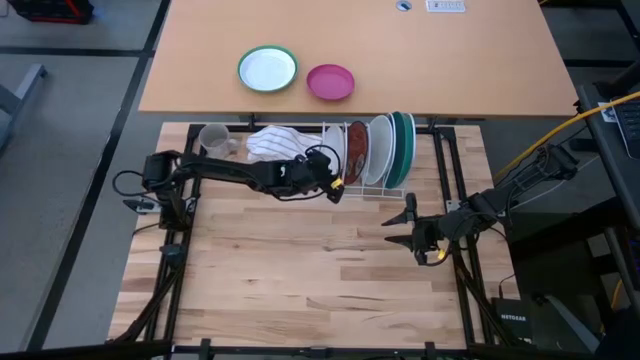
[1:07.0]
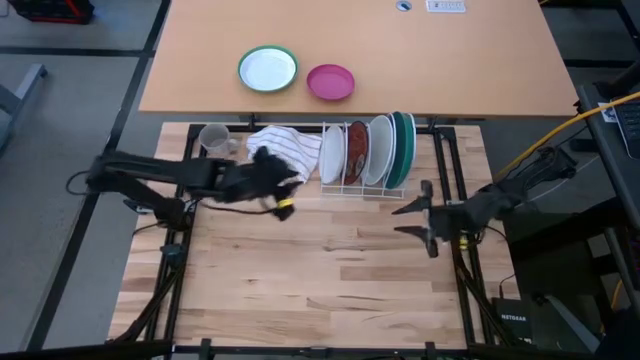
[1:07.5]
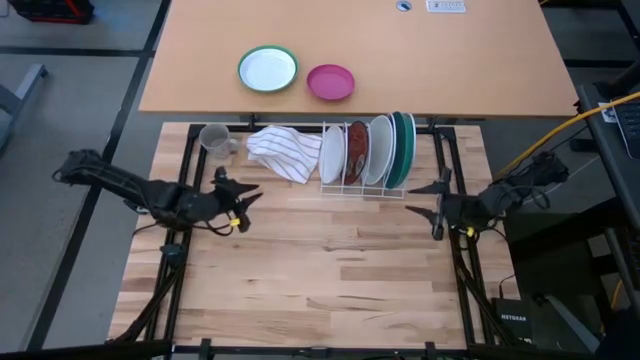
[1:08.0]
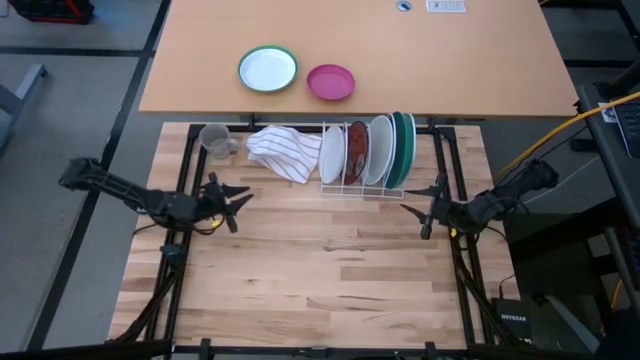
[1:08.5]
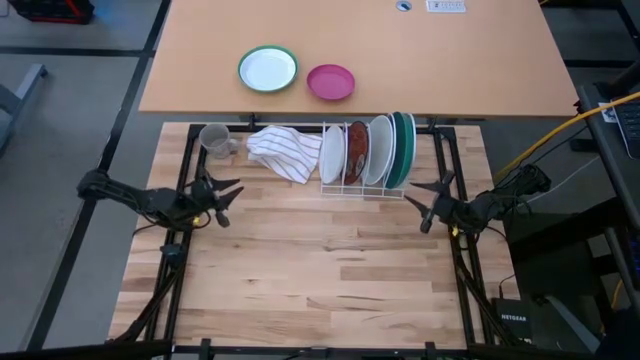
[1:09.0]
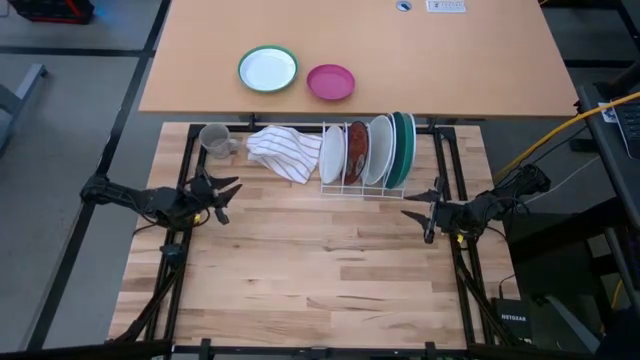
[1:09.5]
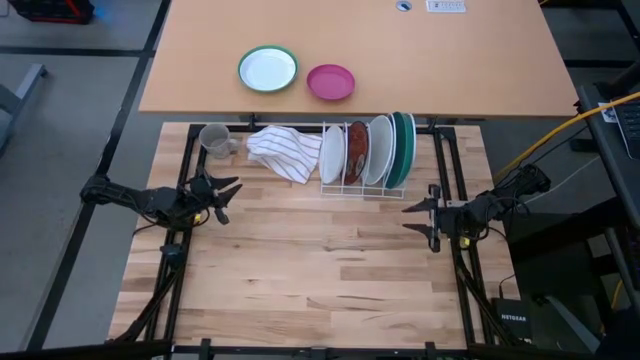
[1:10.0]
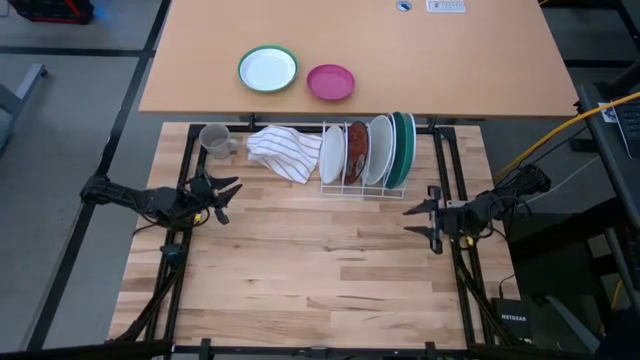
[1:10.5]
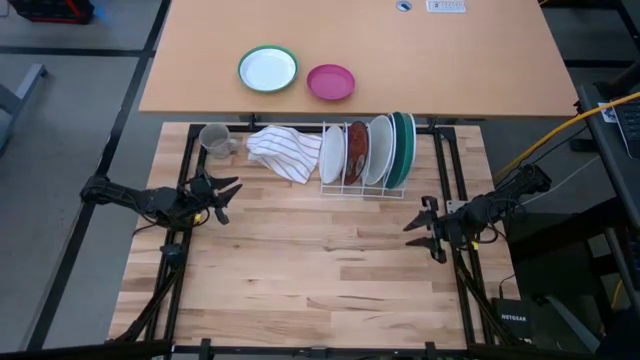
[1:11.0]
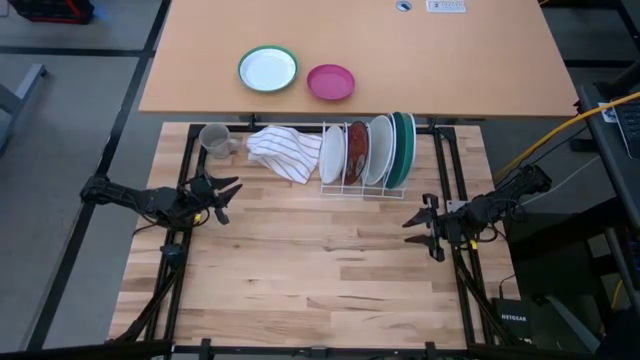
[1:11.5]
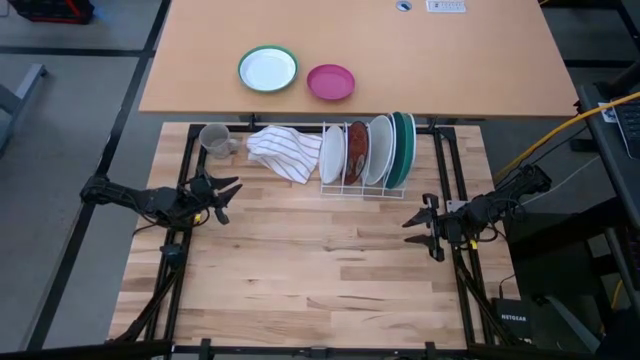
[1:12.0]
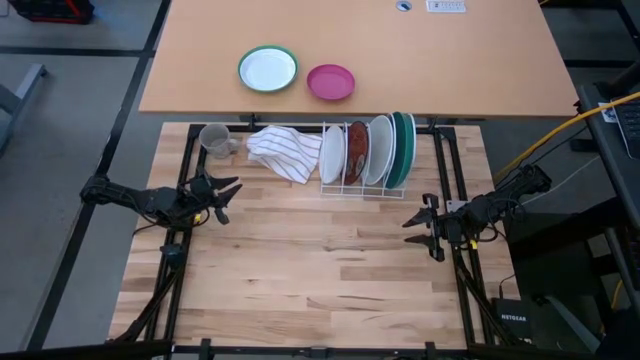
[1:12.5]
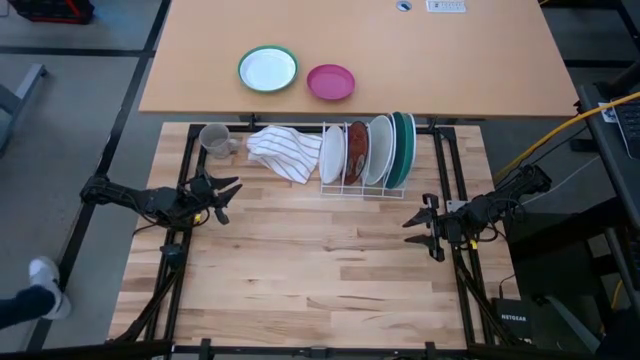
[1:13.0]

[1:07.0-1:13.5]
Task: Sort dishes
Return to Home Position

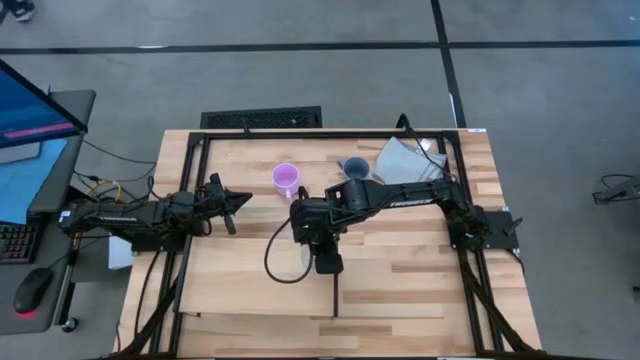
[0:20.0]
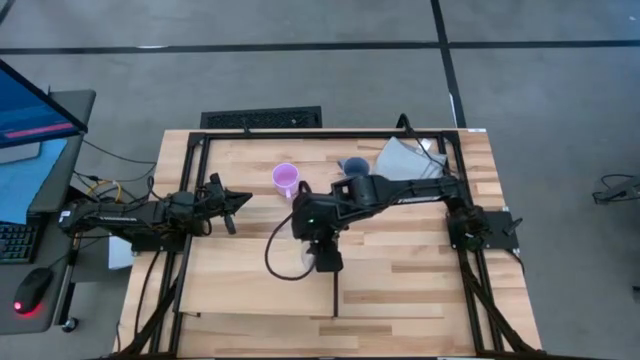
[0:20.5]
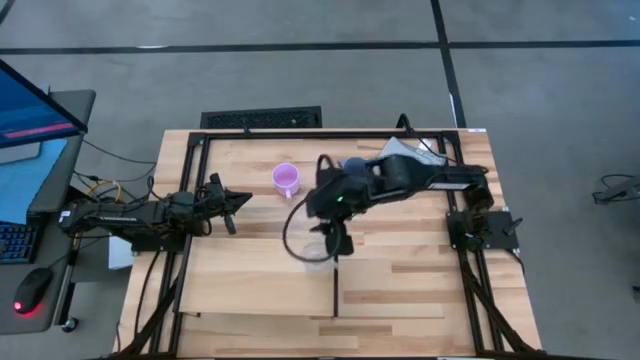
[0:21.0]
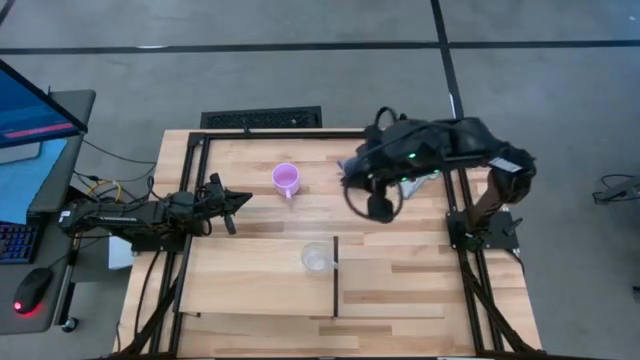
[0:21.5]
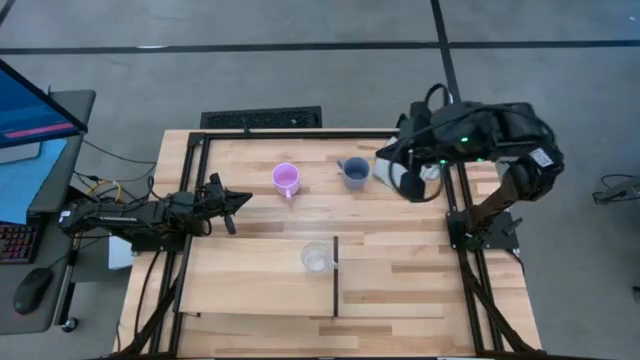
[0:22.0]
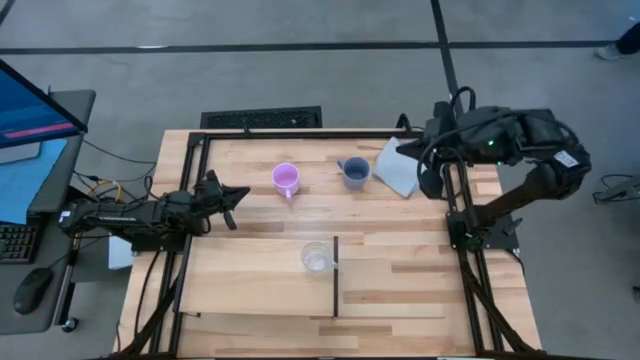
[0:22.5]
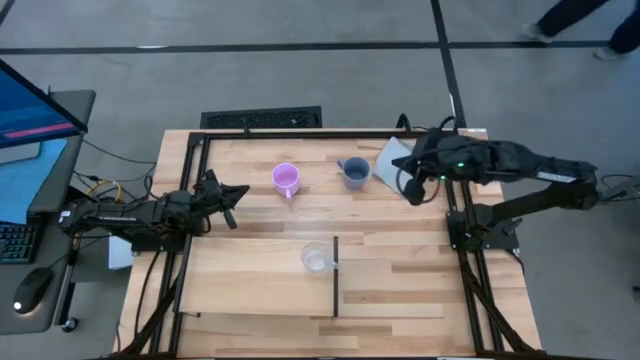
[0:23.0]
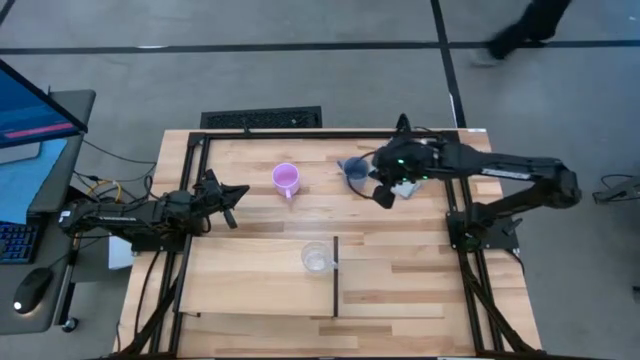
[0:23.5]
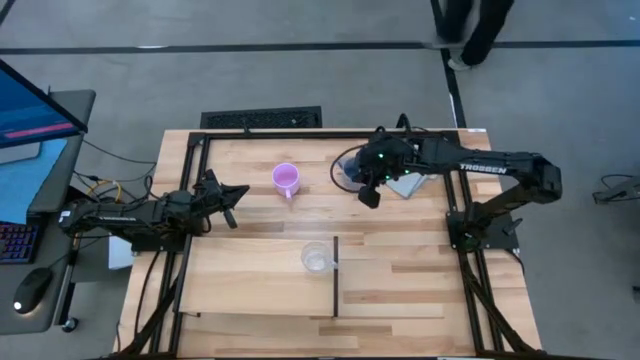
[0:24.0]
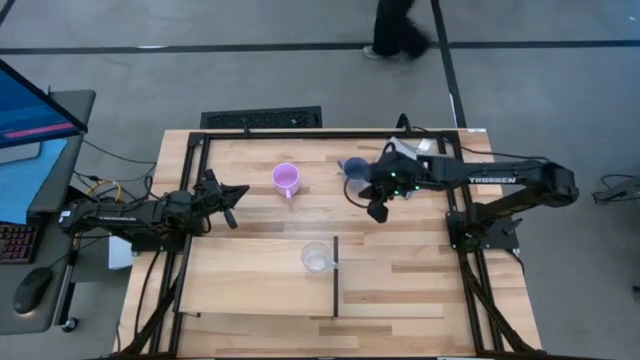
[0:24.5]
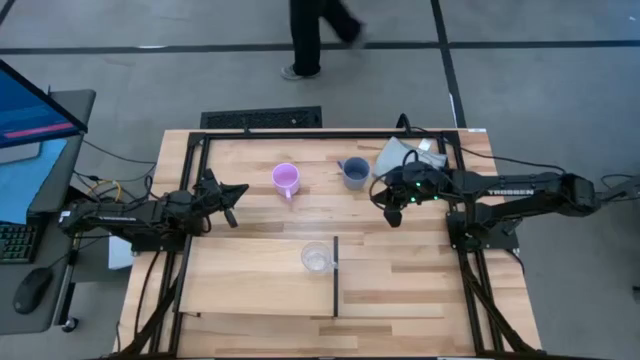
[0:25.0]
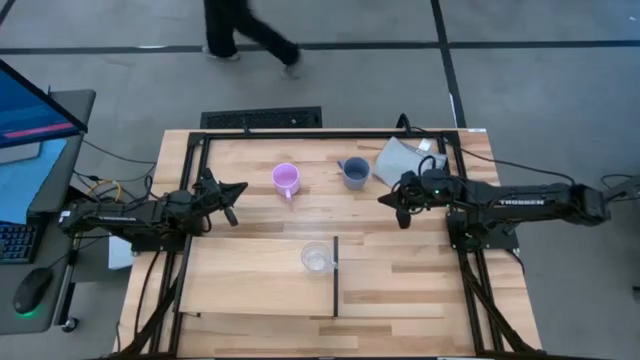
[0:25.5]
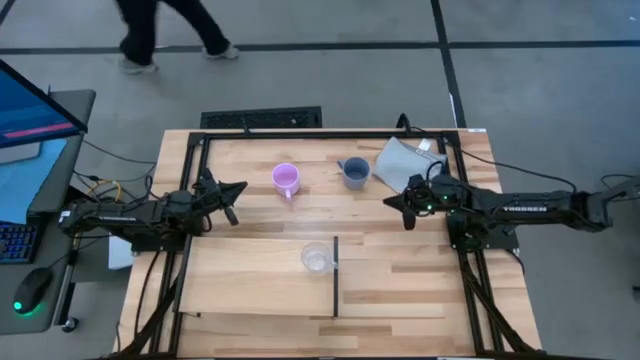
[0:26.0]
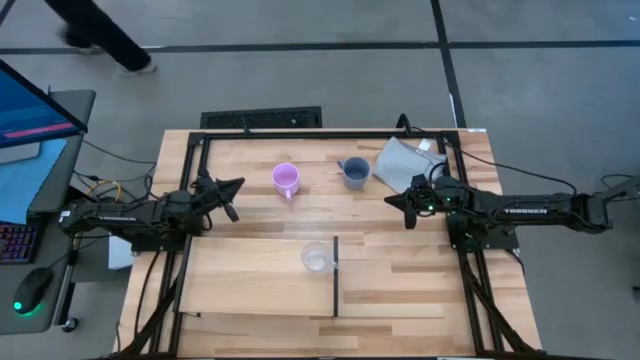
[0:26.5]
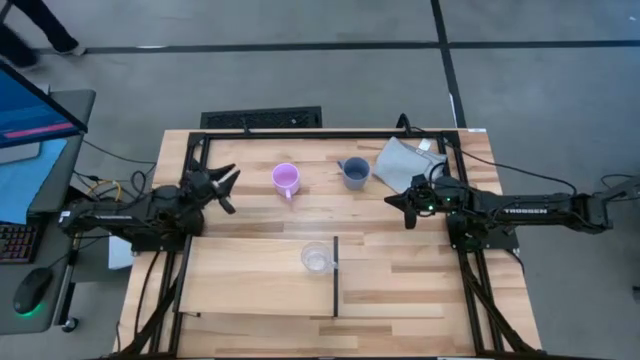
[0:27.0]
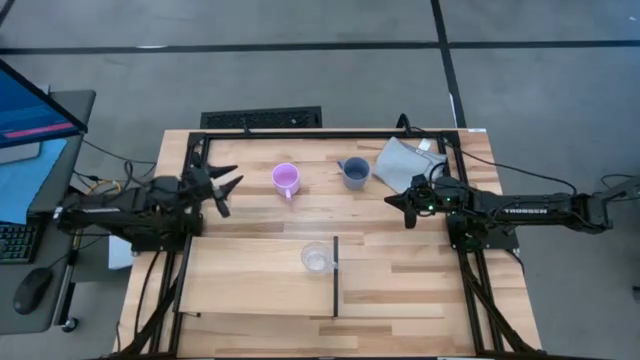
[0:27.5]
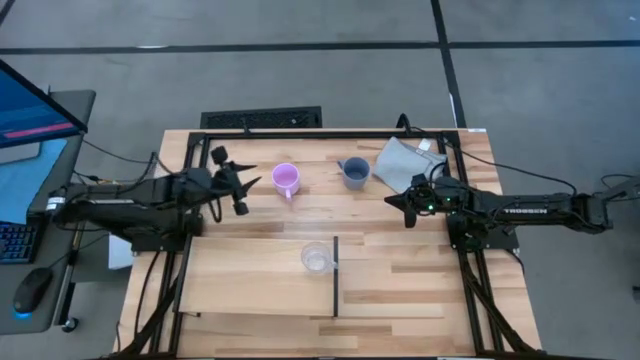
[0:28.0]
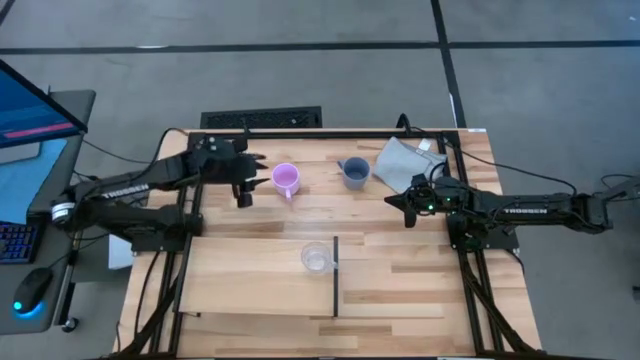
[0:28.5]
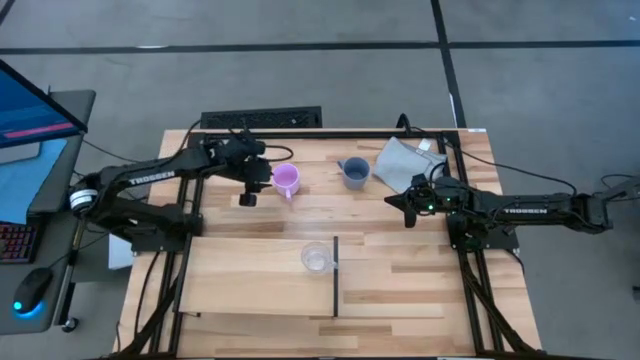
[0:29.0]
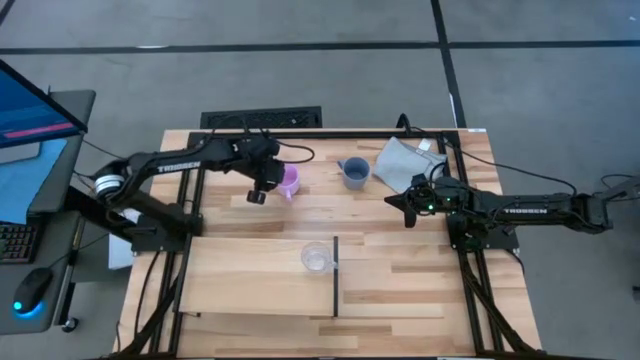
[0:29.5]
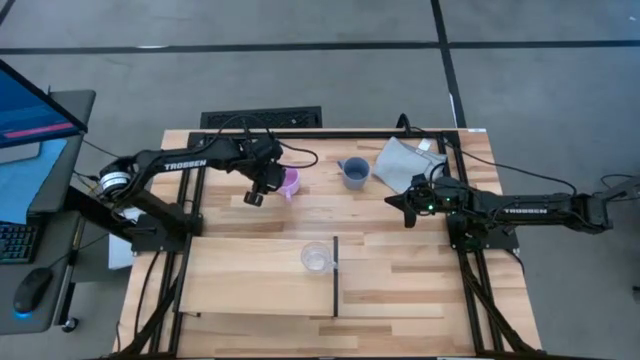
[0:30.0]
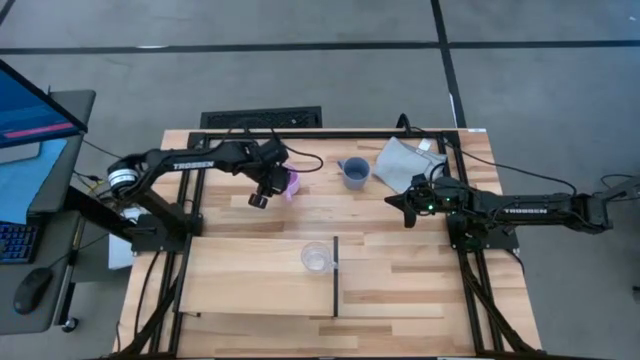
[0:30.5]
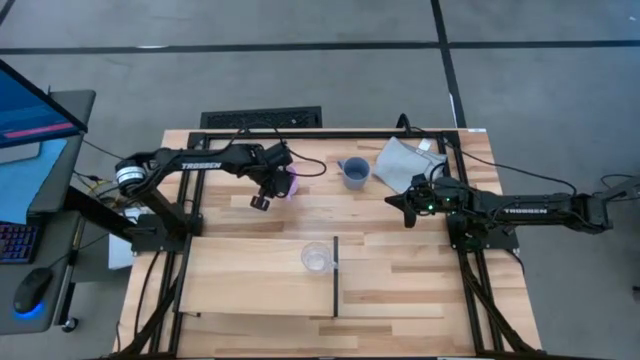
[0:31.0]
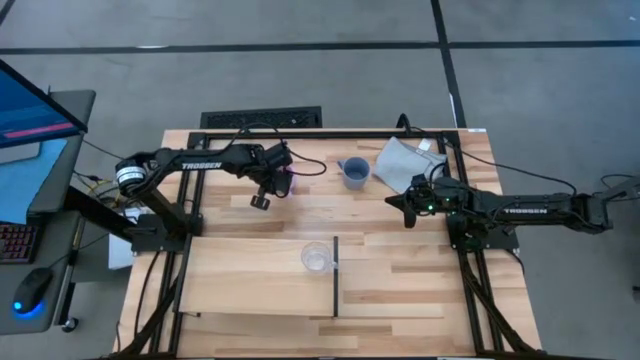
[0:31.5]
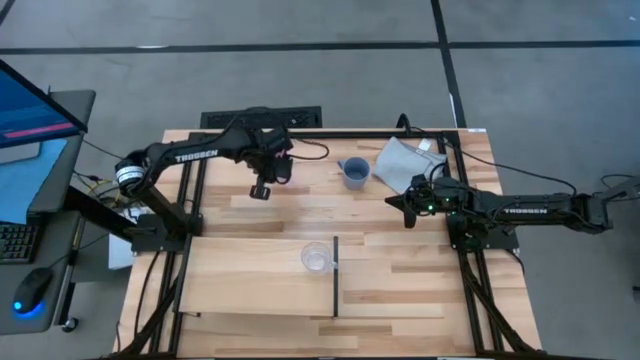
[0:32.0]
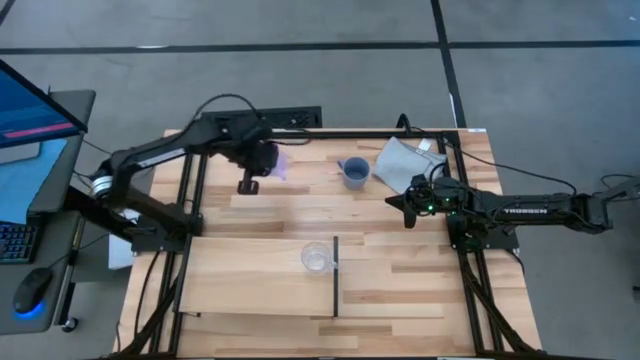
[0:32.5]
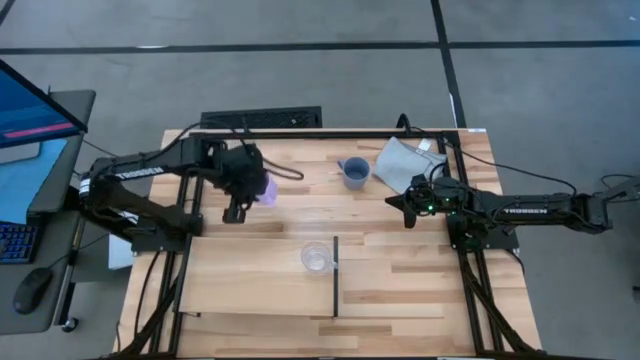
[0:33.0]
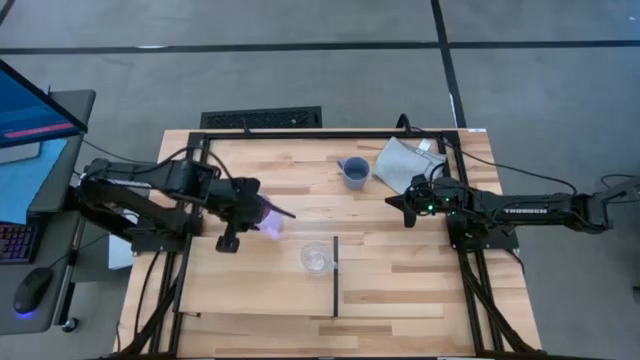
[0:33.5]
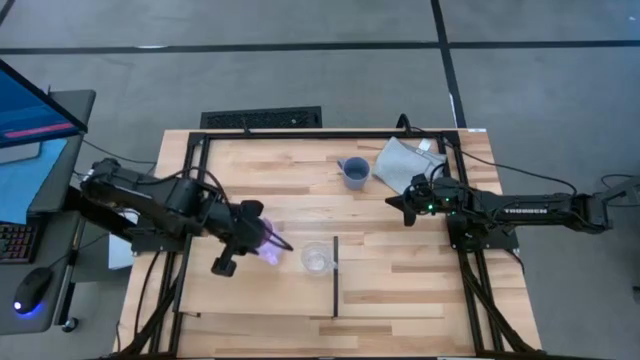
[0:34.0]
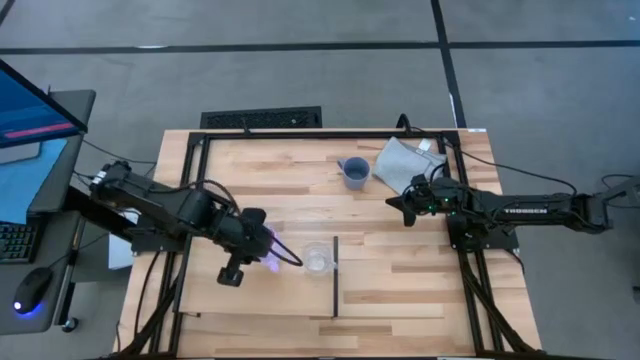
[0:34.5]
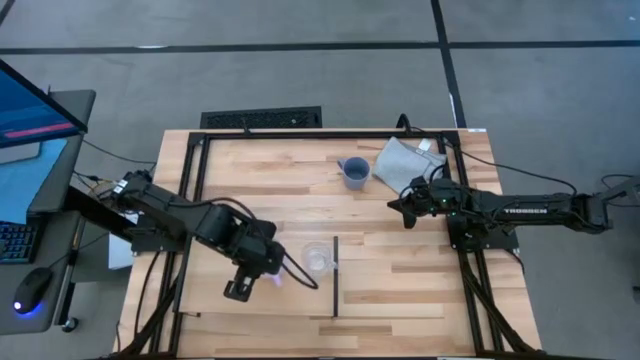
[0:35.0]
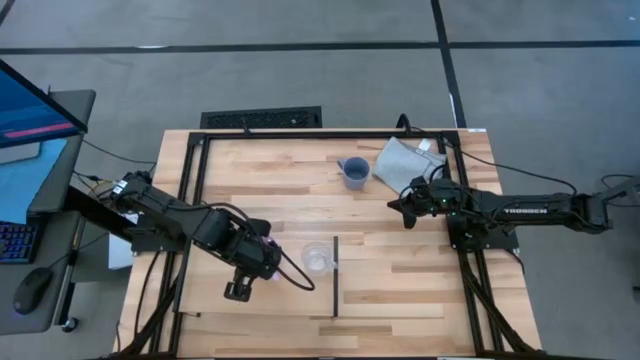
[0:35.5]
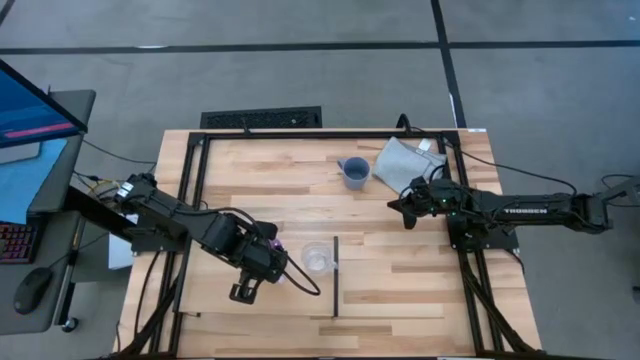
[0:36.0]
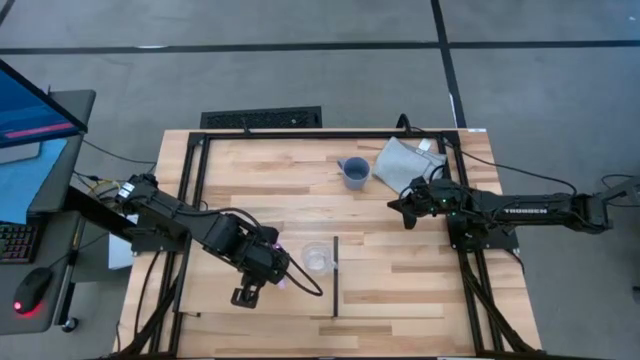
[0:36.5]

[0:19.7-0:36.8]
Task: Stack small to large cups/mugs on shelf
Put the pink mug on the shelf
